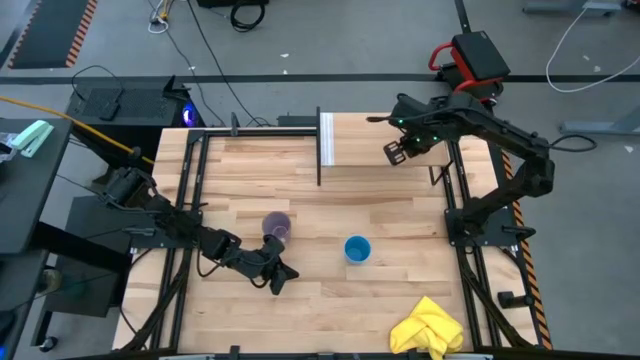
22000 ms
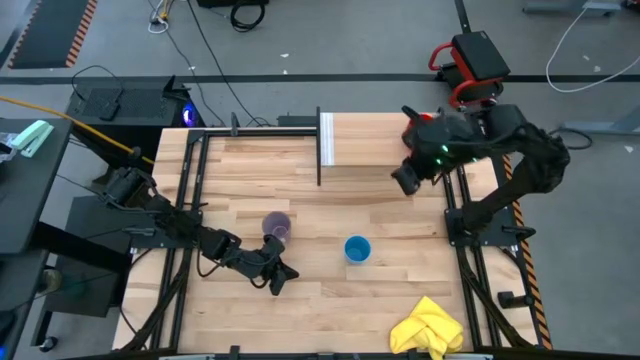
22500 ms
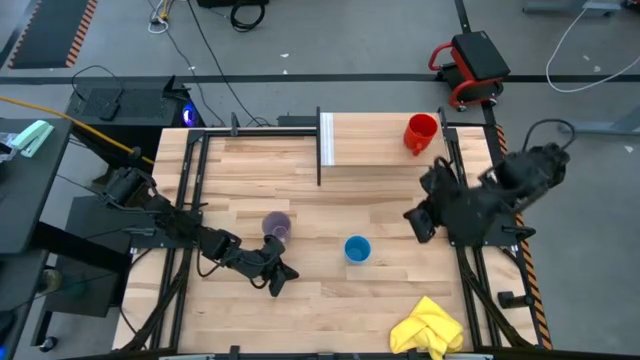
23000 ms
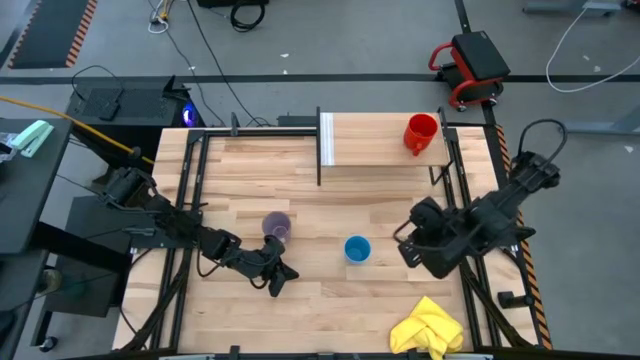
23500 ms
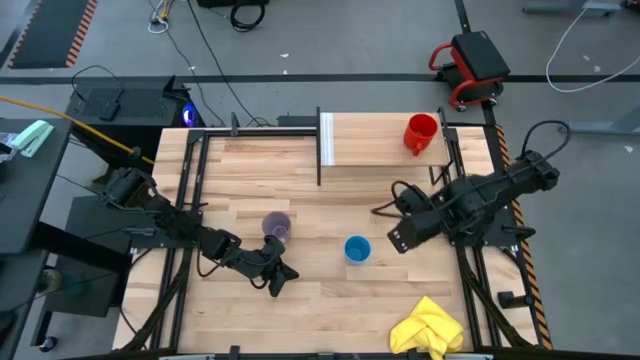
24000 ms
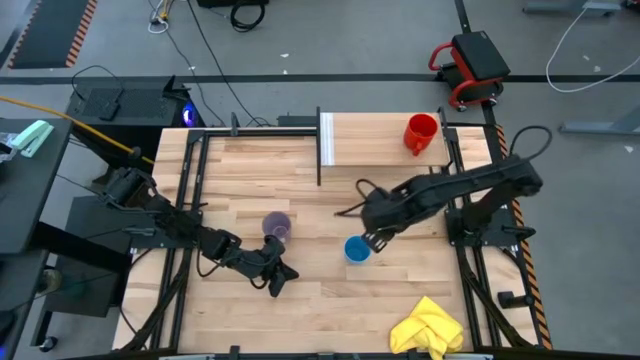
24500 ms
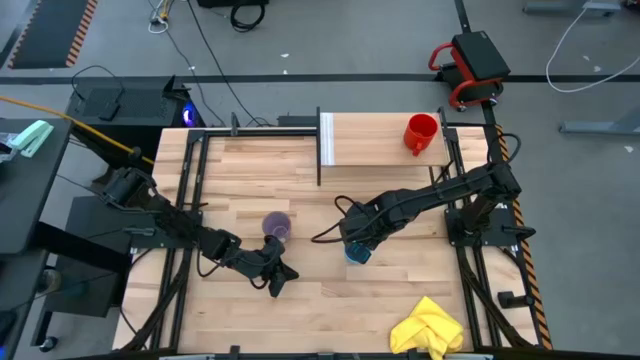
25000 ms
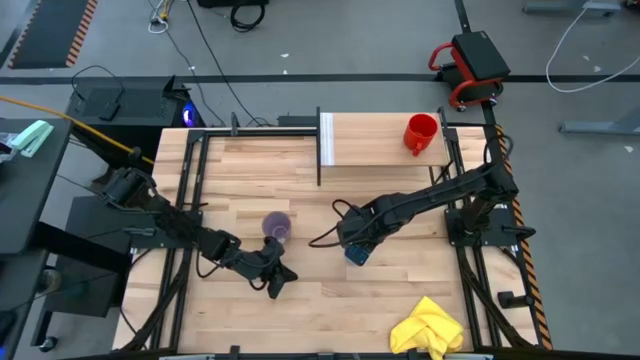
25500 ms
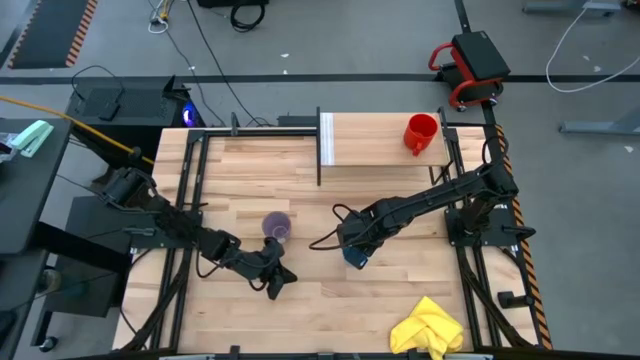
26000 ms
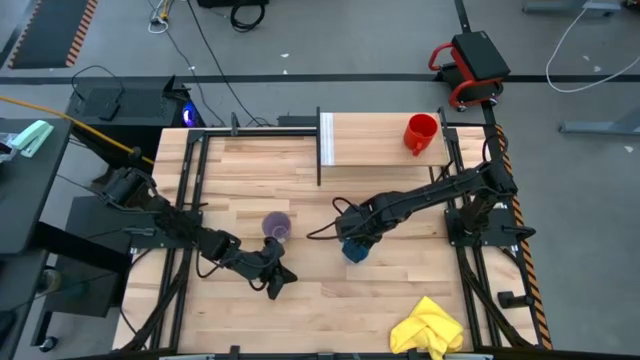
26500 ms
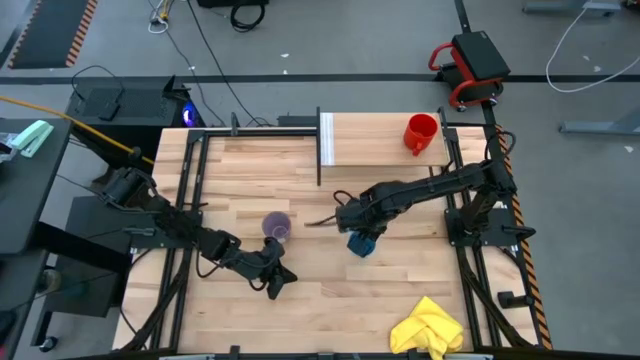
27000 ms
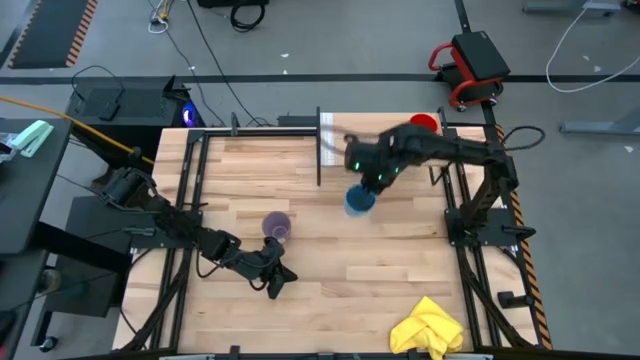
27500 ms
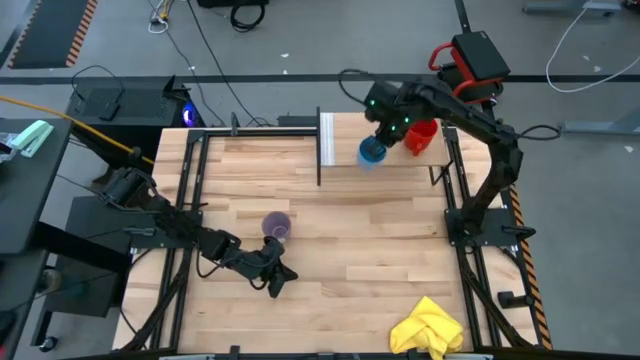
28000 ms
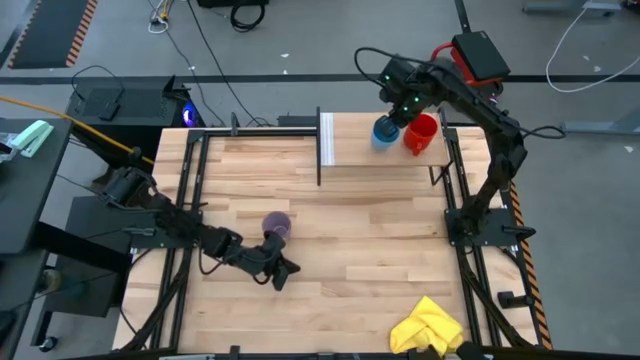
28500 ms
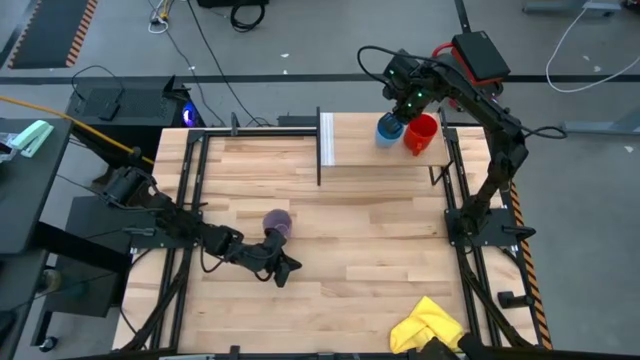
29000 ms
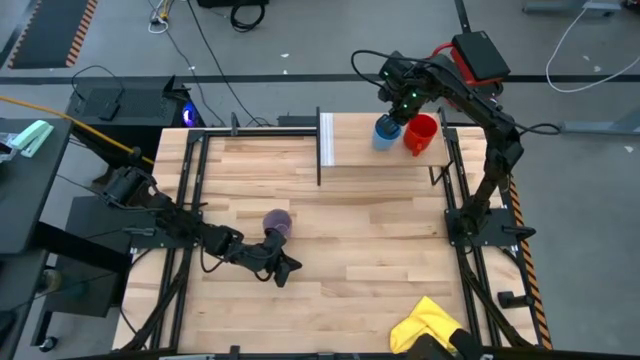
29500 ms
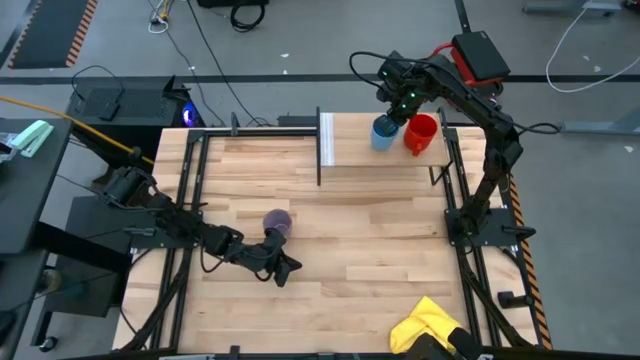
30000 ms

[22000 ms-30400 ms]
Task: Stack small to large cups/mugs on shelf
Put the blue cup on the shelf

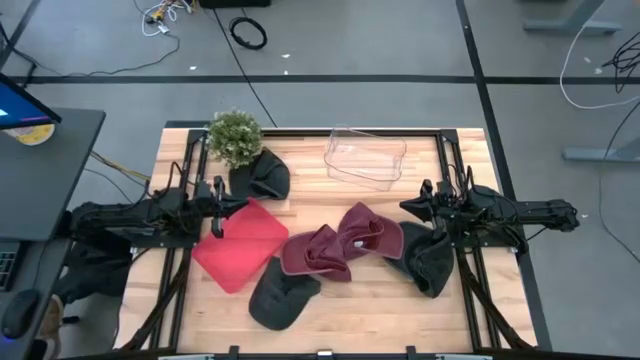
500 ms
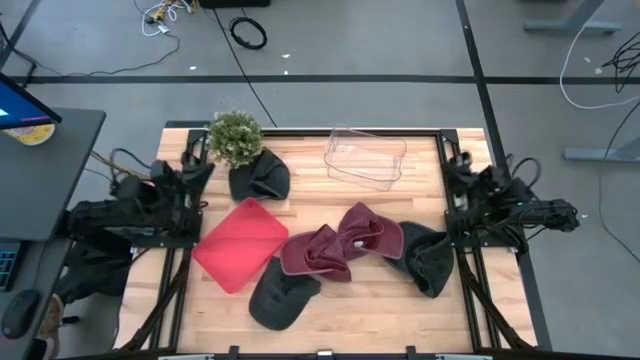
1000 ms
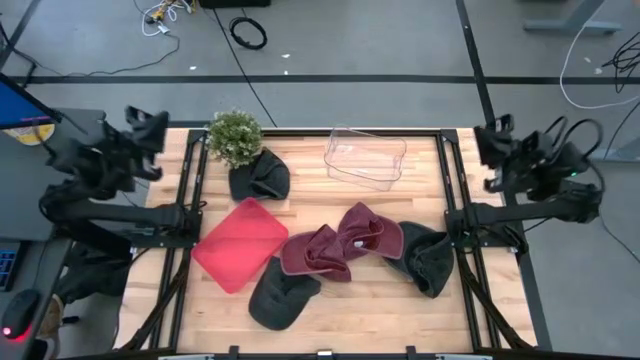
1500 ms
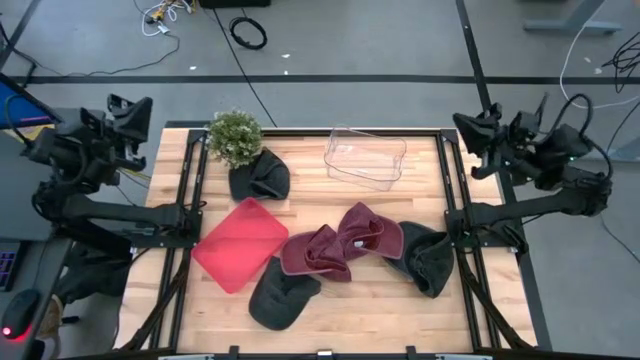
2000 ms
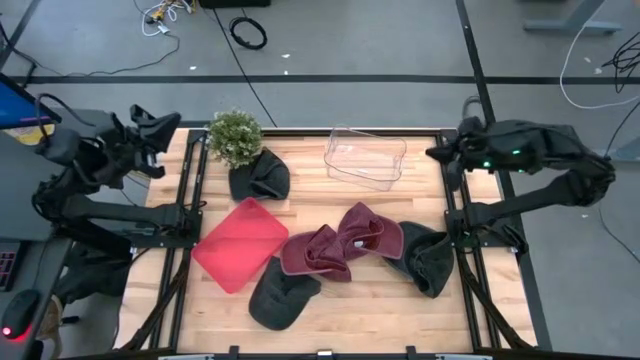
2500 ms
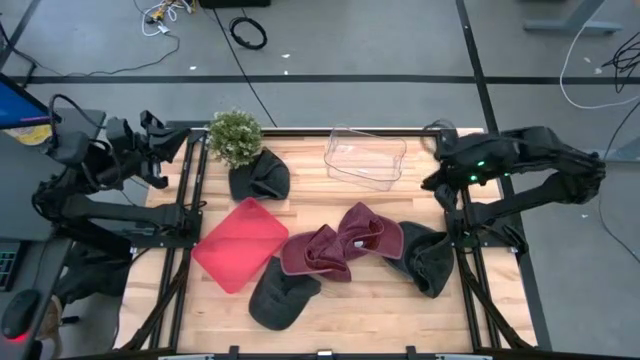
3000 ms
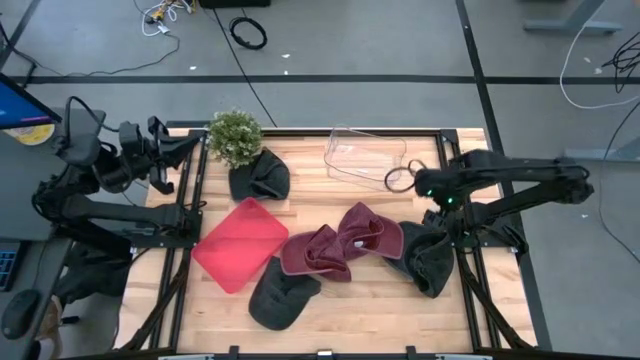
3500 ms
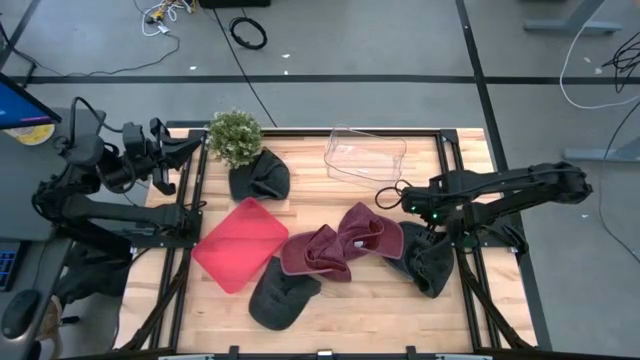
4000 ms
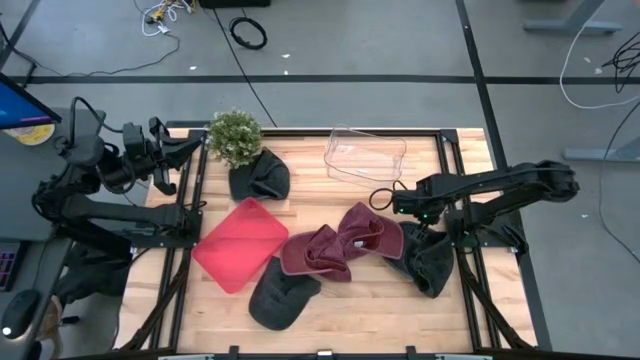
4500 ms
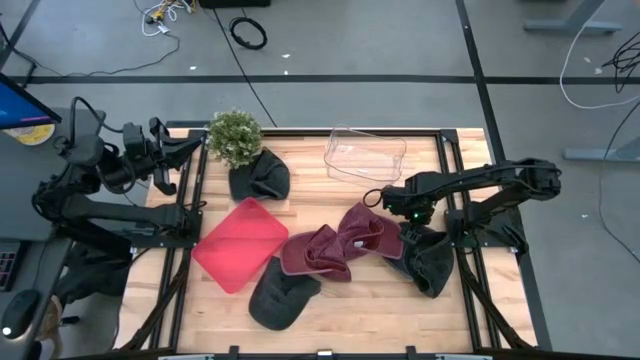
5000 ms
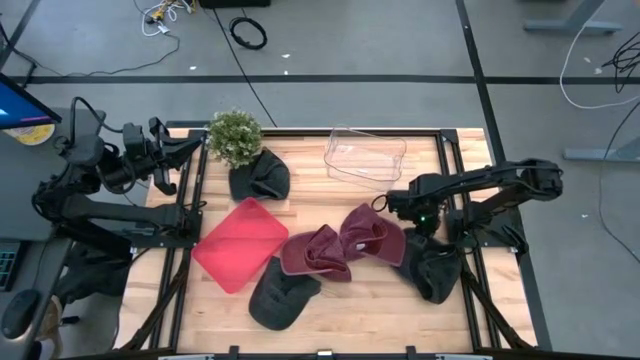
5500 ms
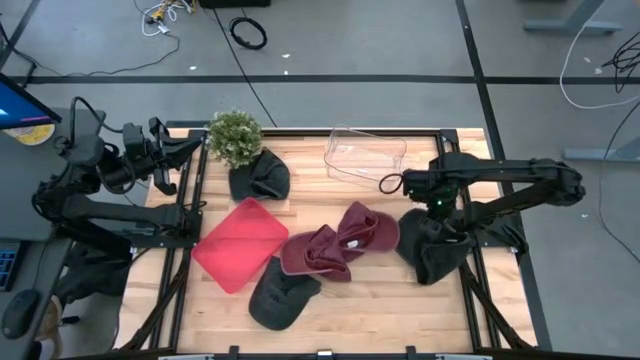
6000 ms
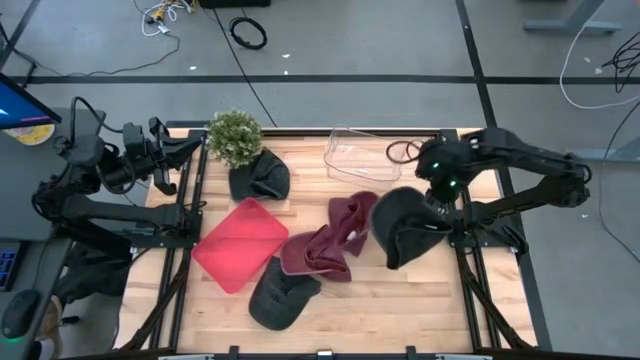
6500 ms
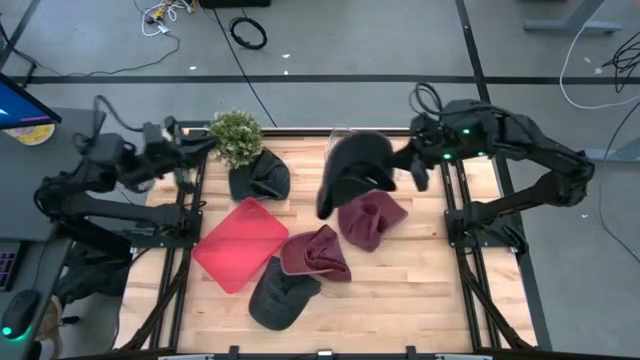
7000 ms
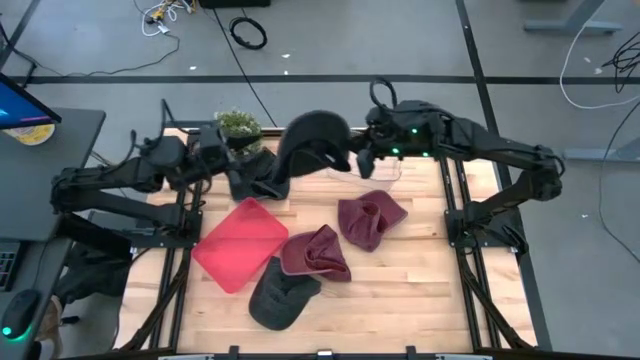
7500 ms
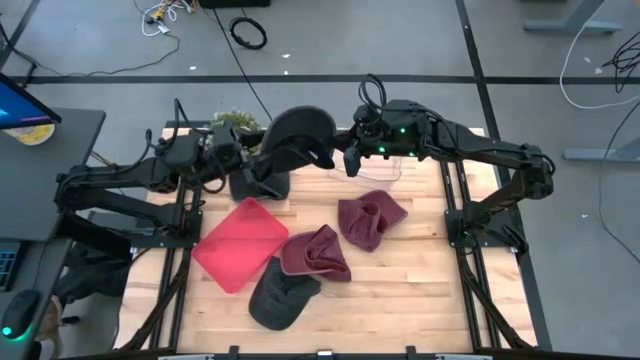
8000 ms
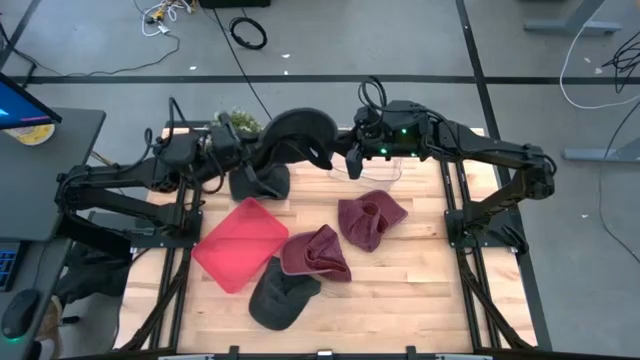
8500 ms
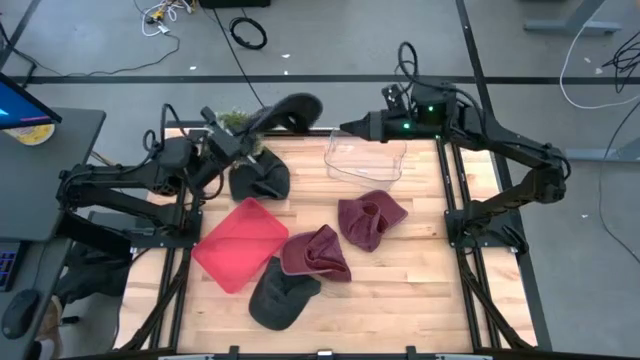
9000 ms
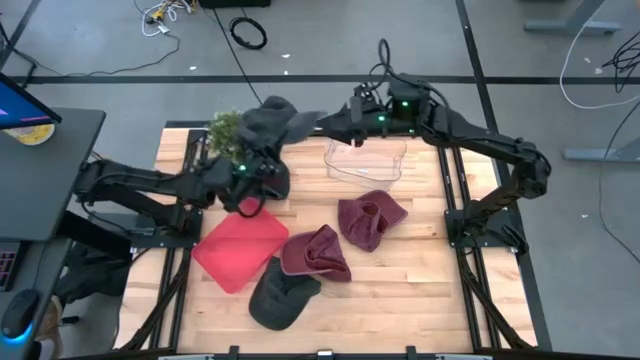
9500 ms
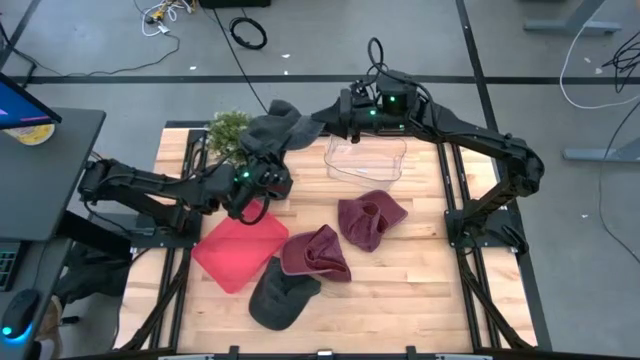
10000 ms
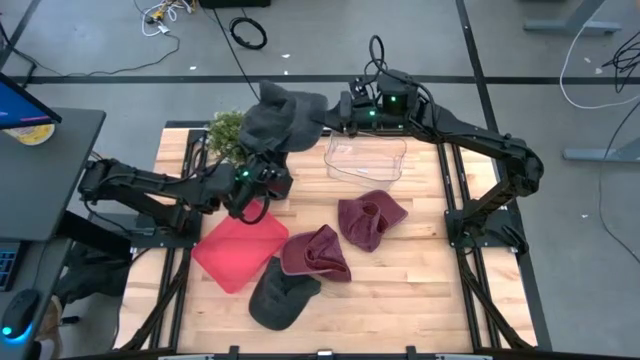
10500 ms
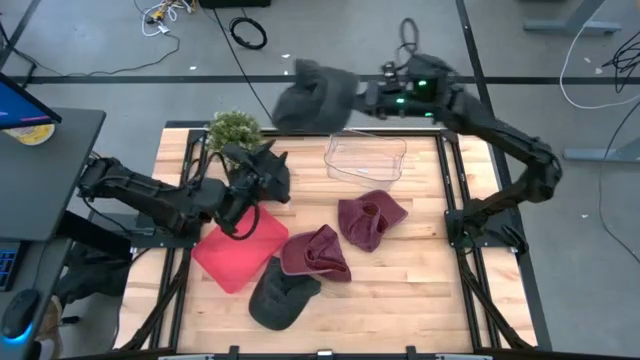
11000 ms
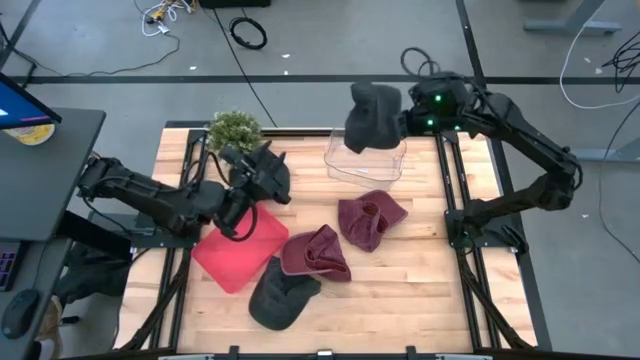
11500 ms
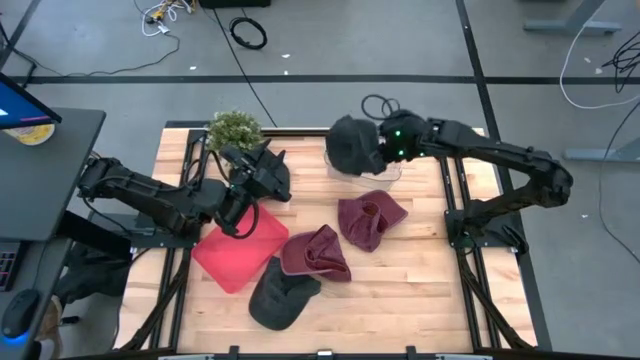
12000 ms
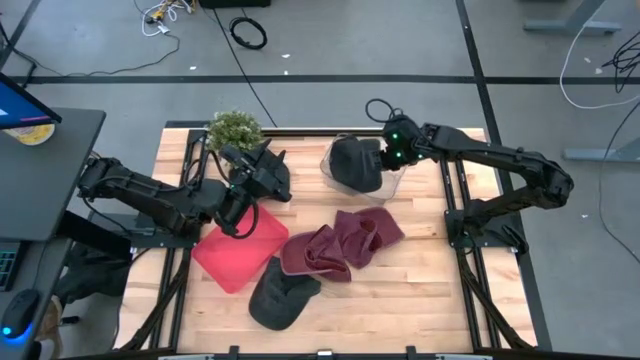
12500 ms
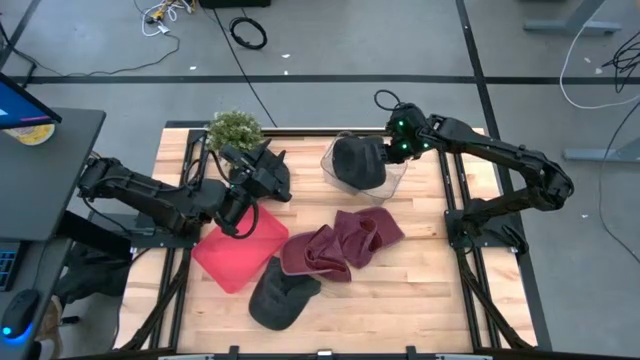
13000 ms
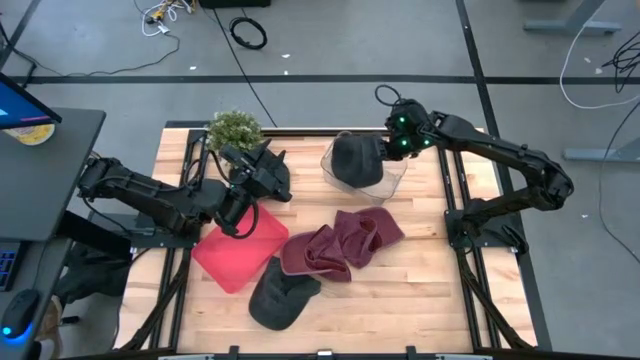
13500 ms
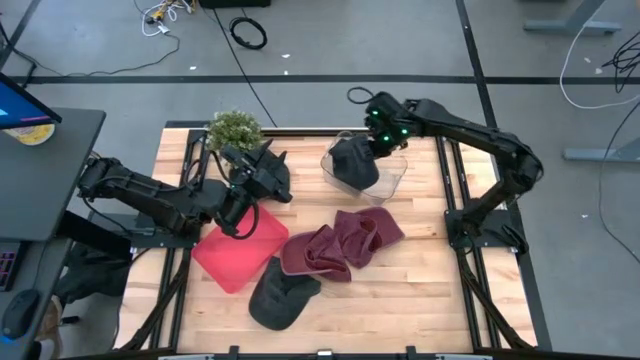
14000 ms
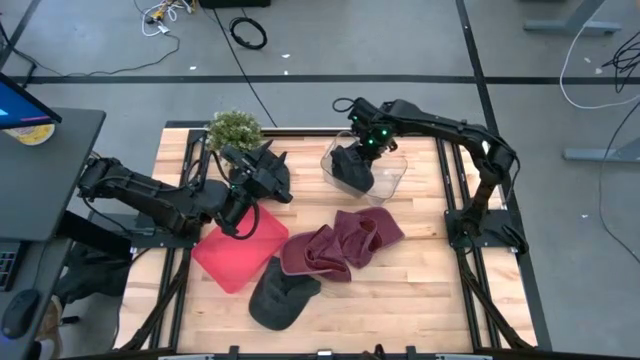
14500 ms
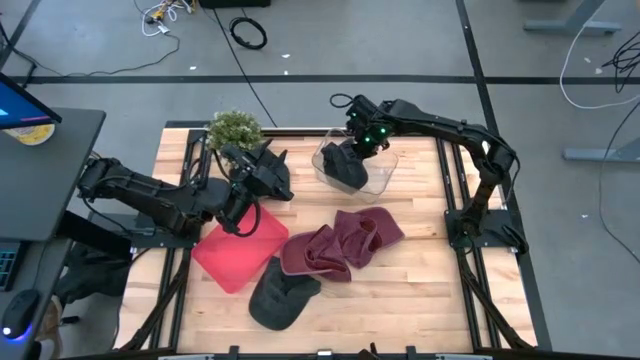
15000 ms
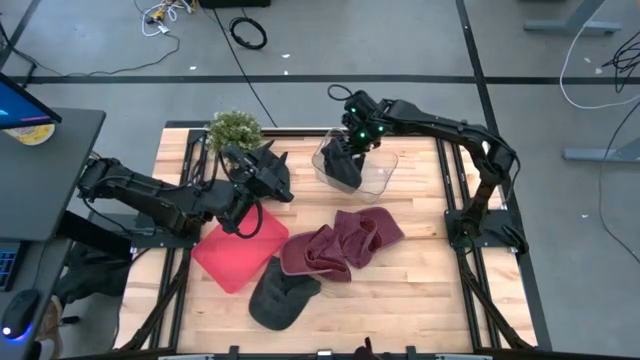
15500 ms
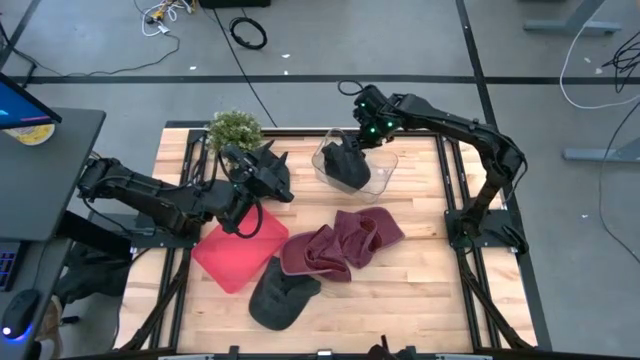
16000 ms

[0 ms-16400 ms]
Task: Pick & Place hat
Put the right black cap into the transparent bin
